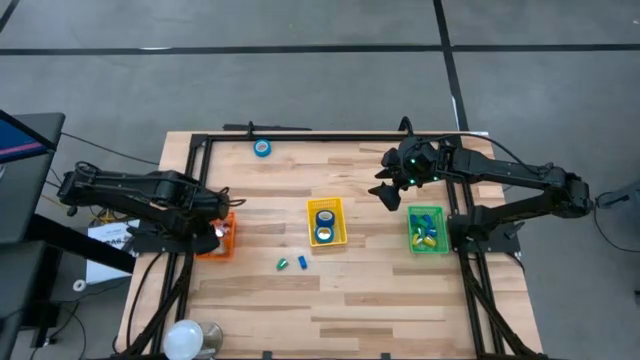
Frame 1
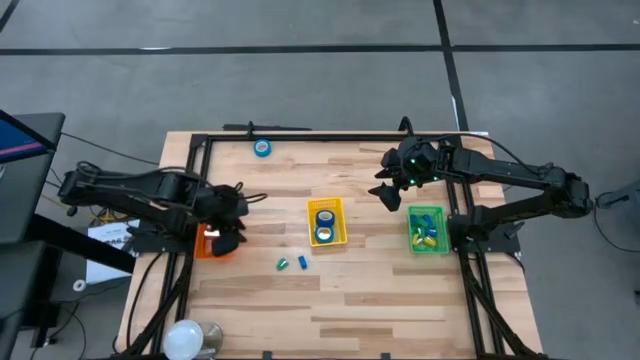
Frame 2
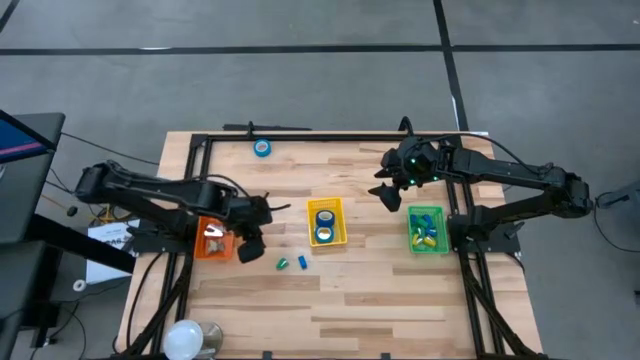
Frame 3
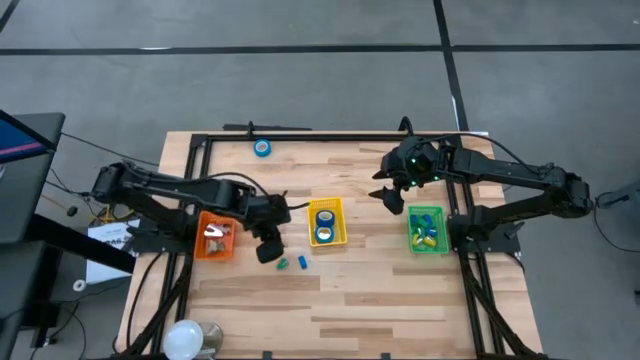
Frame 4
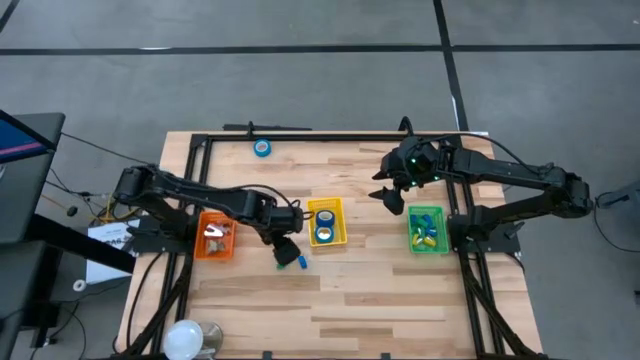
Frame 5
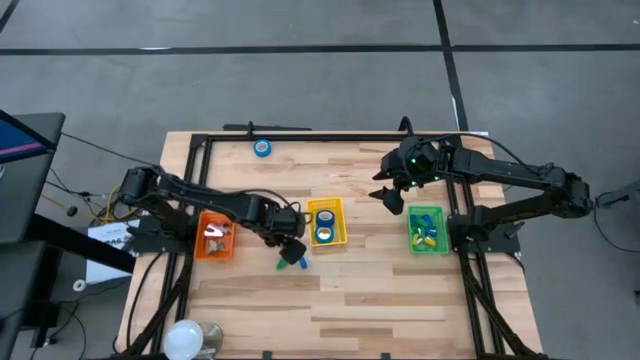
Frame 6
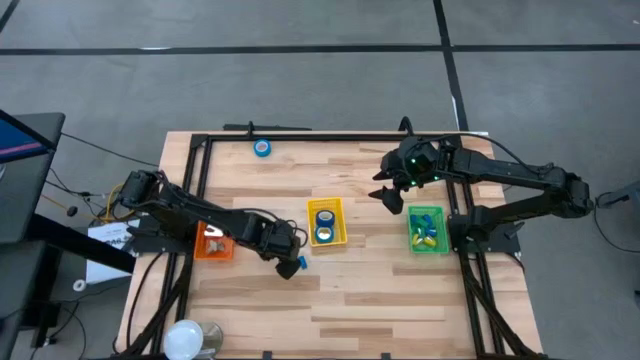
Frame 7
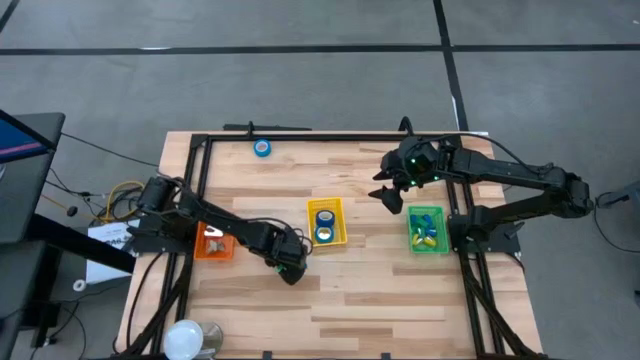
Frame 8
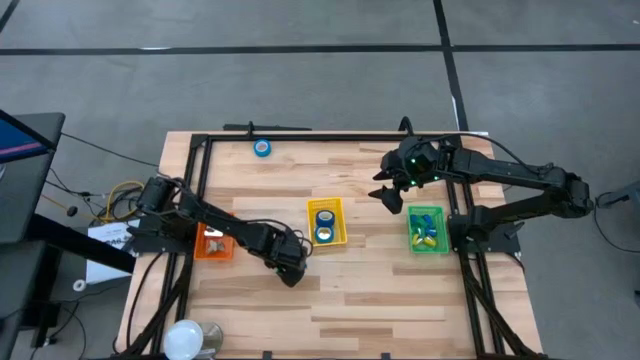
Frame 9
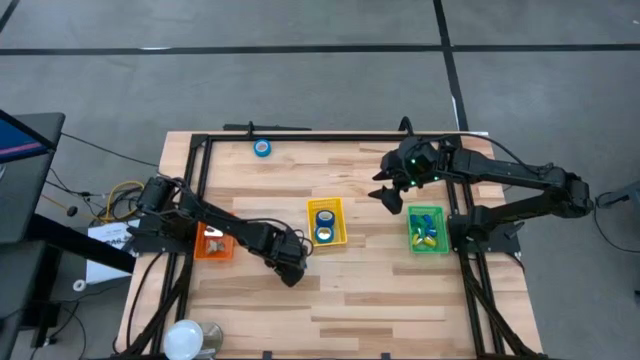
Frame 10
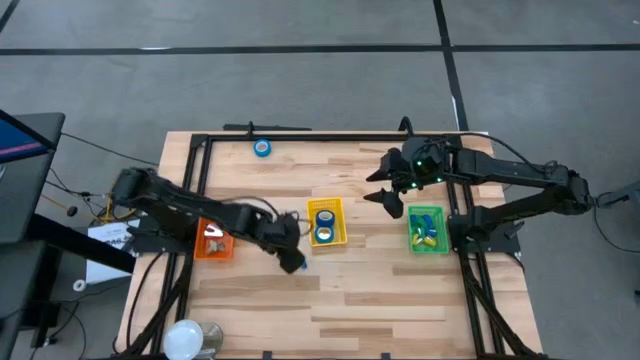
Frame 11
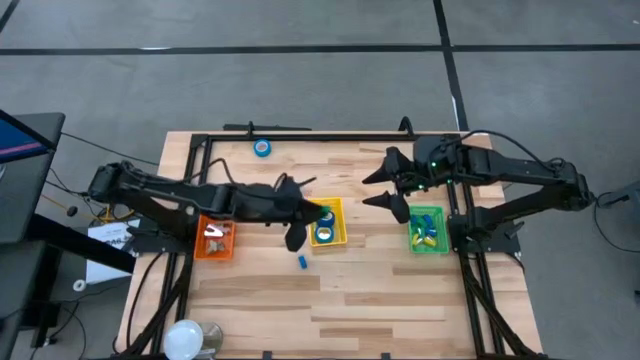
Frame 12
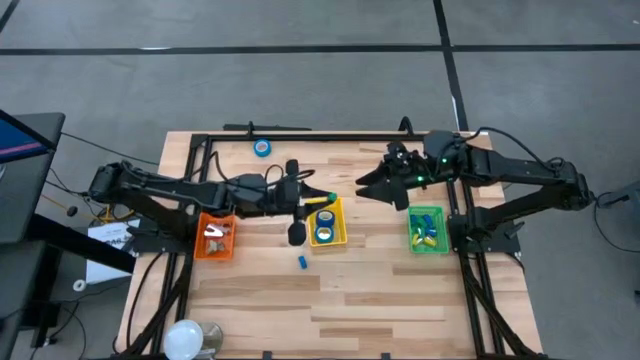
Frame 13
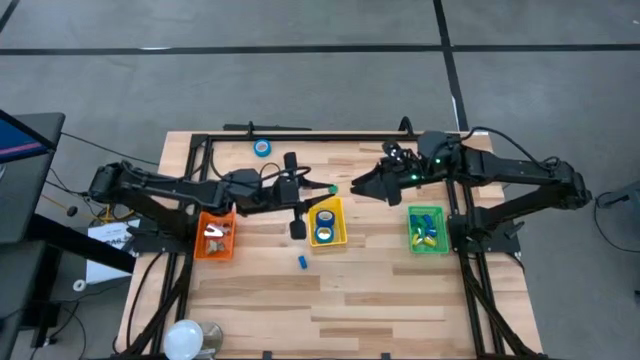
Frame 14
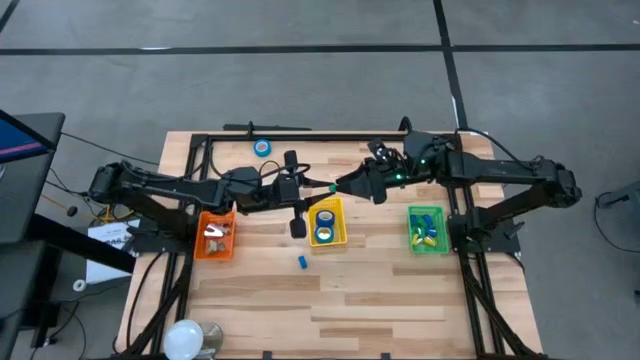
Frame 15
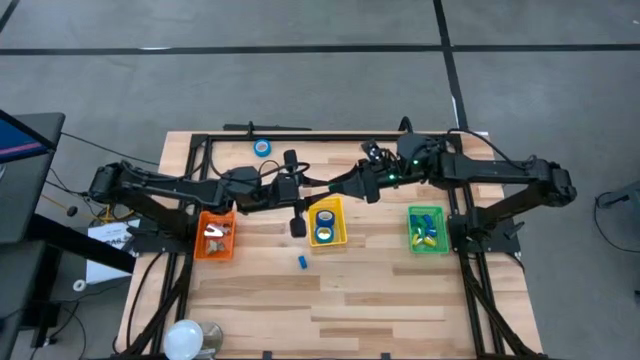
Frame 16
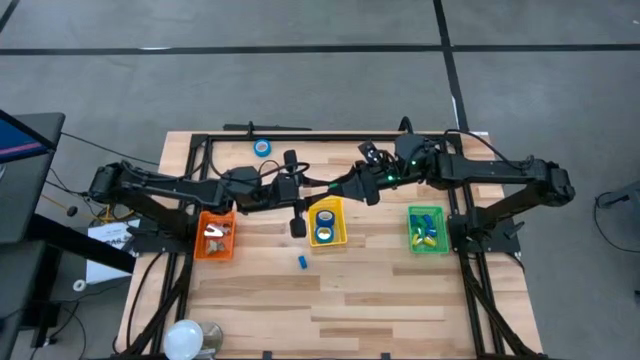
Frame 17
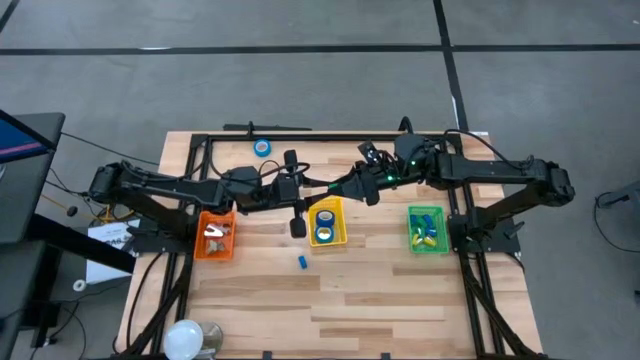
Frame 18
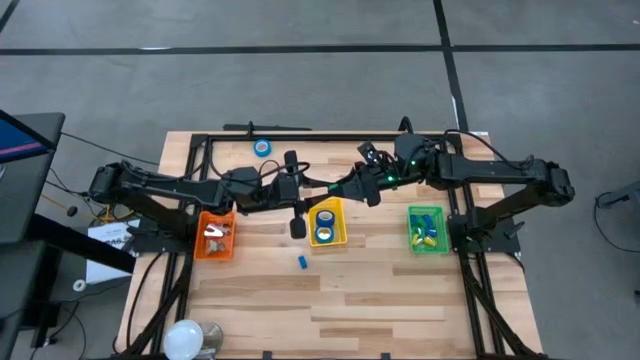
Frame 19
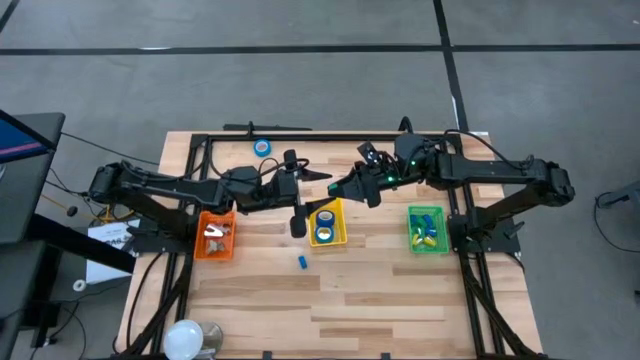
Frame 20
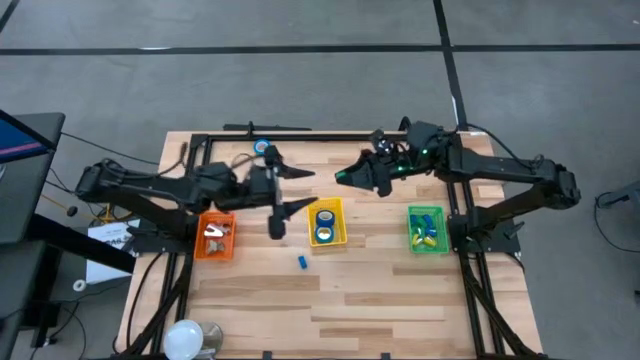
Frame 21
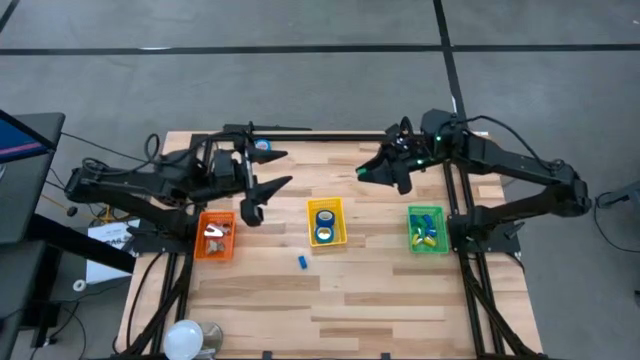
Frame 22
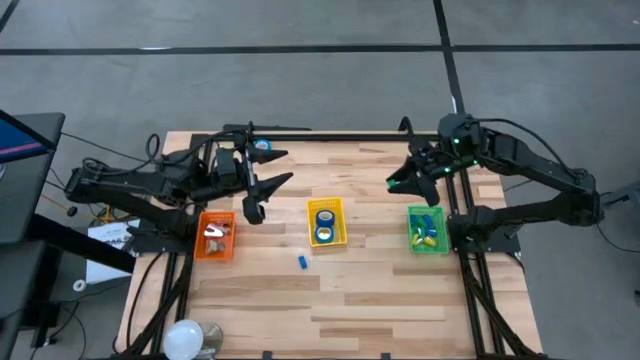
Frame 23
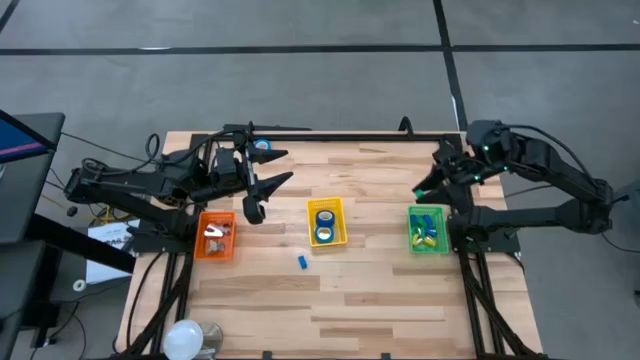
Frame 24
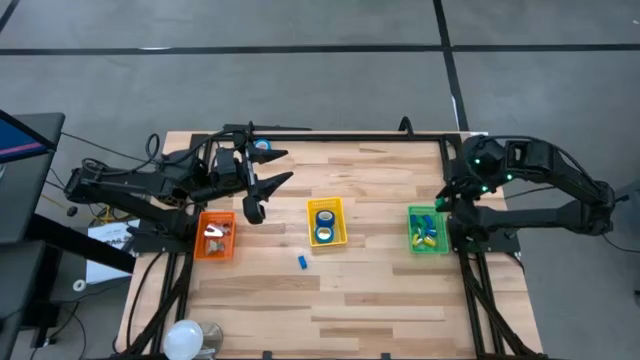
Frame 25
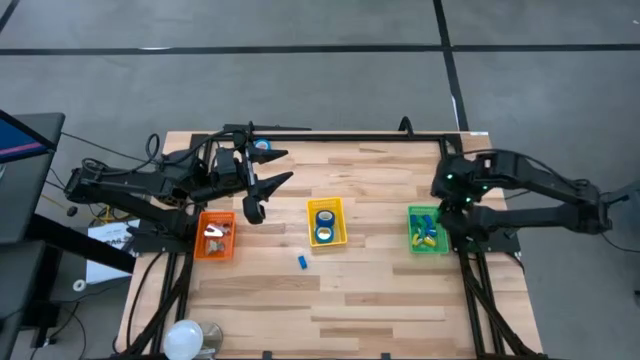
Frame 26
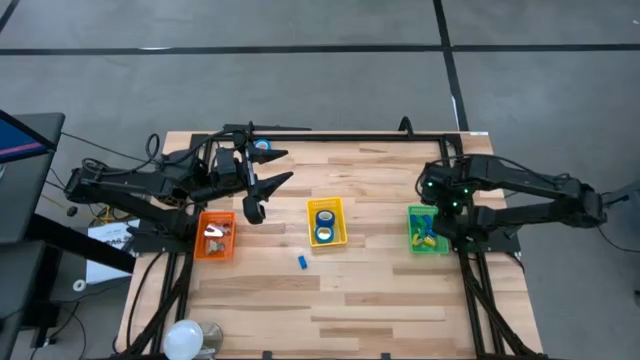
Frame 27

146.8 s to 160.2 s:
Task: Pick and place Stapler, Stapler remover, tape
Put the green stapler into the green basket

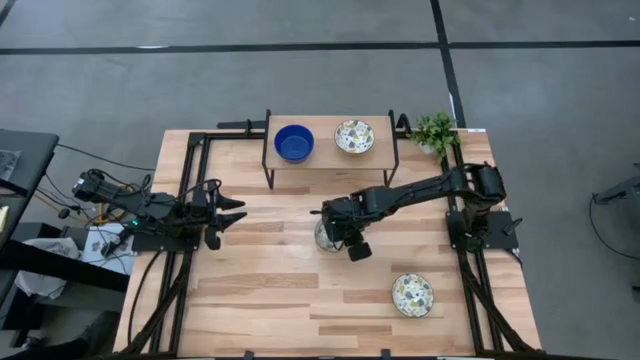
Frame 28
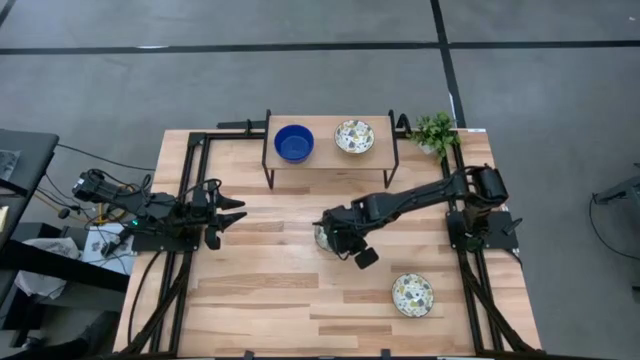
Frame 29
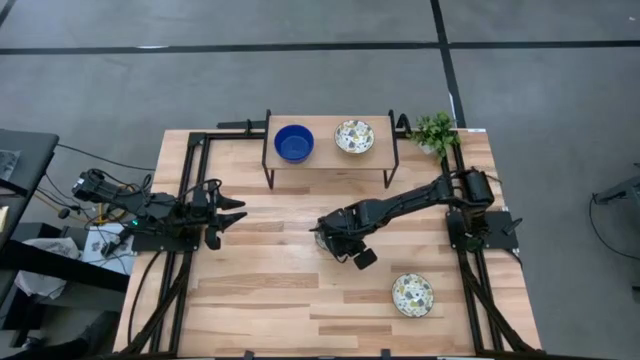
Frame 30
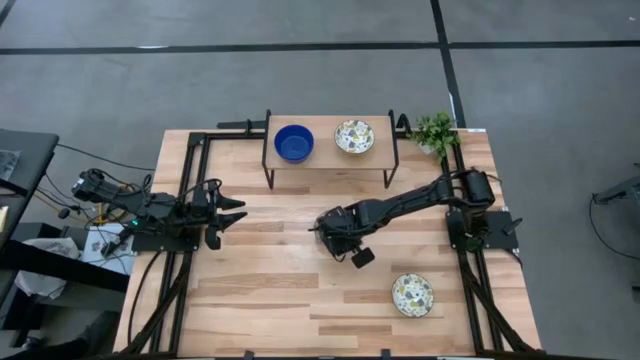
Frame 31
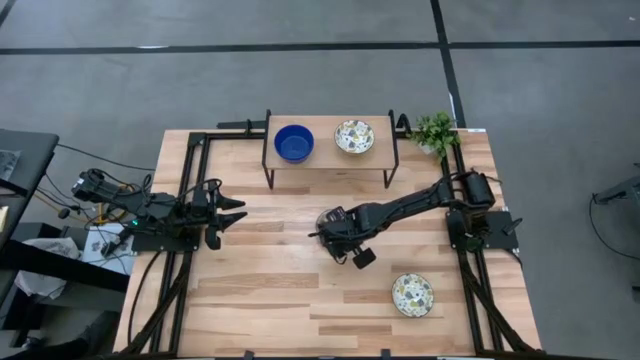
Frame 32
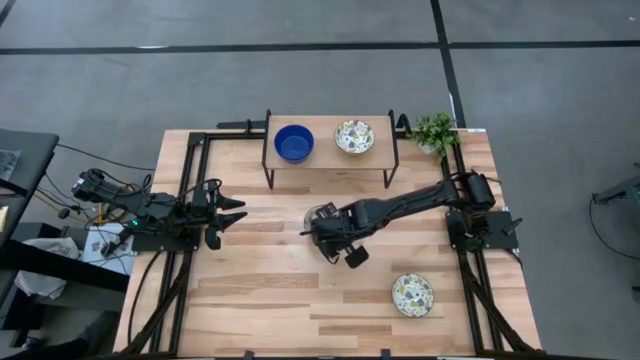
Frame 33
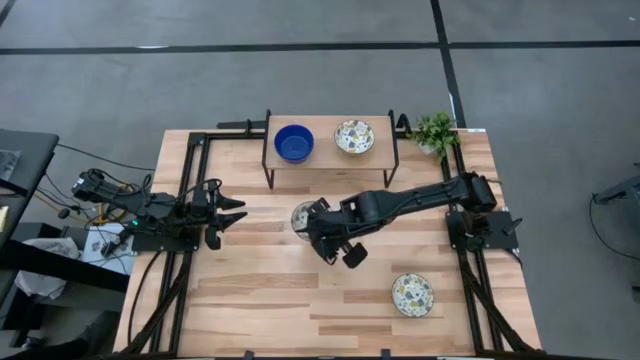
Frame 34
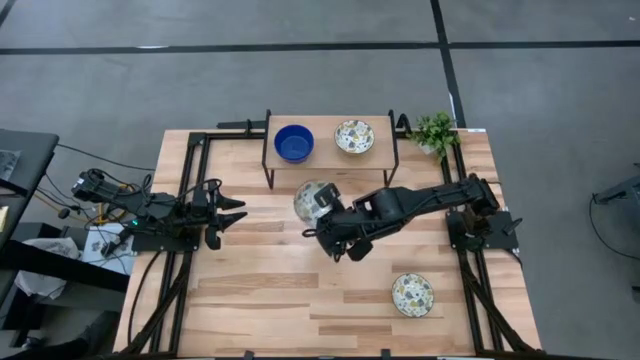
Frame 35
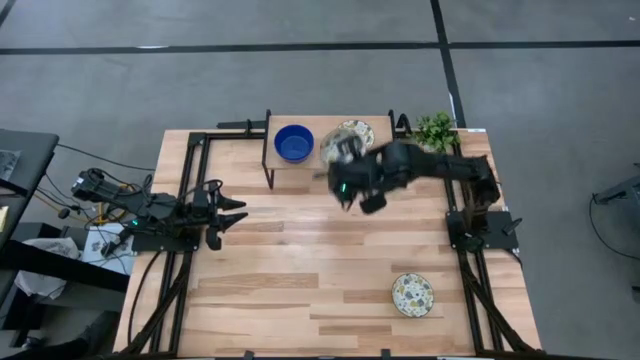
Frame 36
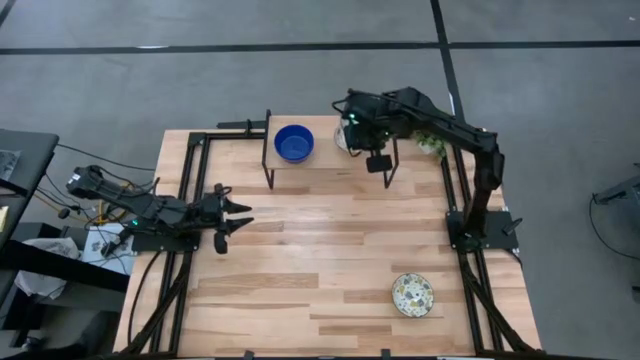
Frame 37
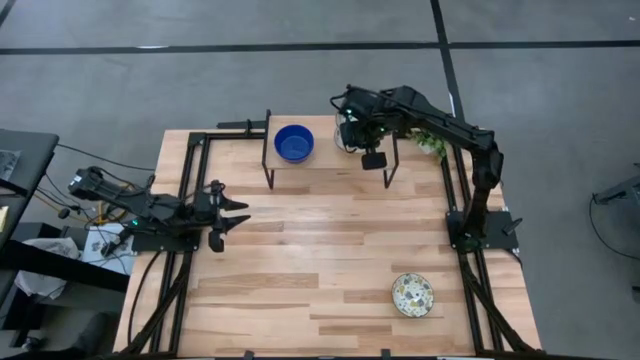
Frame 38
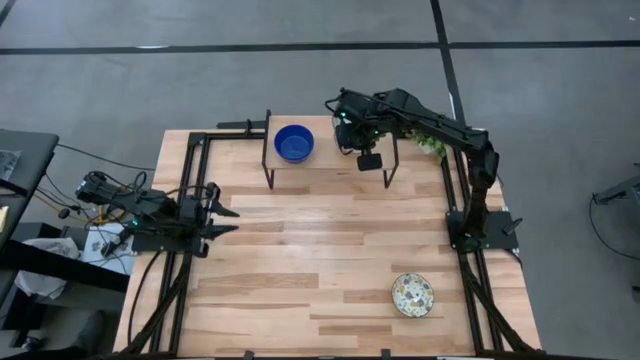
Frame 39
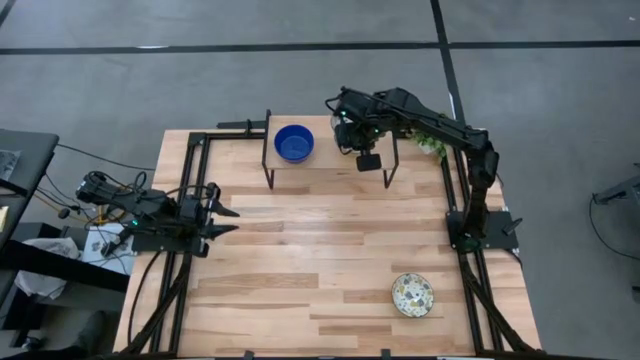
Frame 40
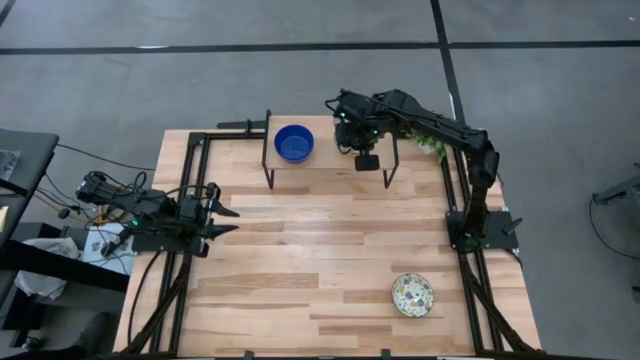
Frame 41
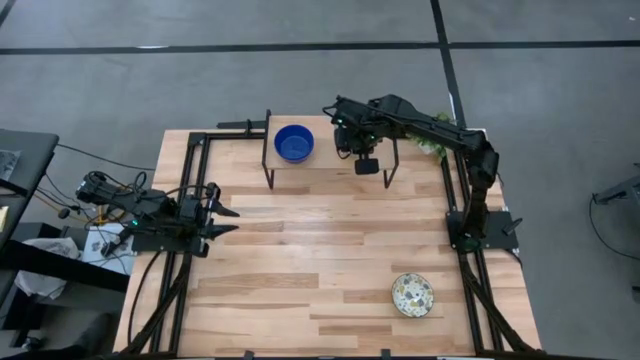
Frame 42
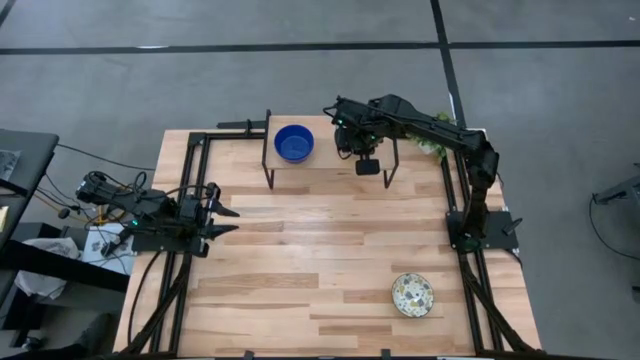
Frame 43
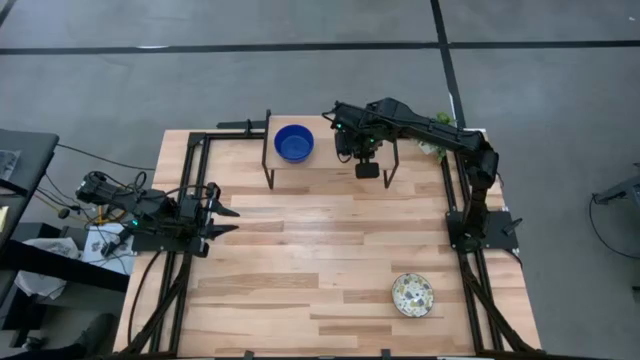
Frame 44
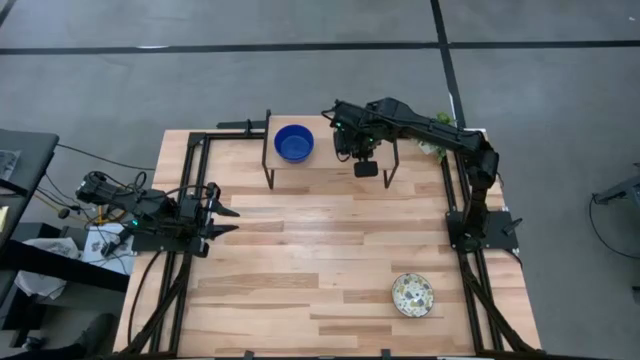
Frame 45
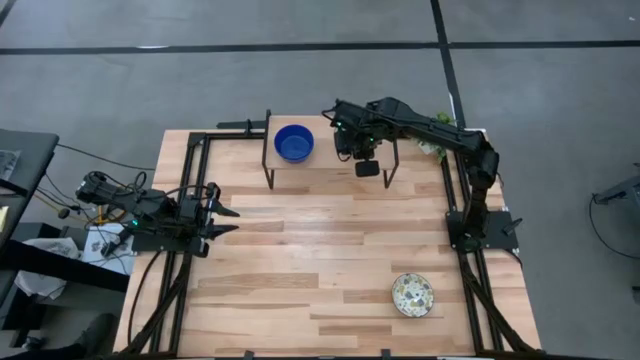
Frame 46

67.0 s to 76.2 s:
Task: Pick & Place Mini bowls
Stack the top yellow patterned bowl on the yellow patterned bowl on the shelf
